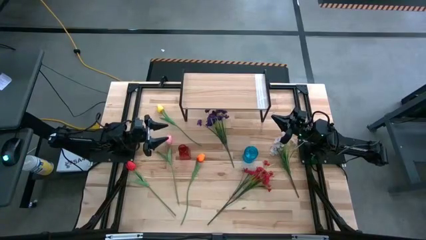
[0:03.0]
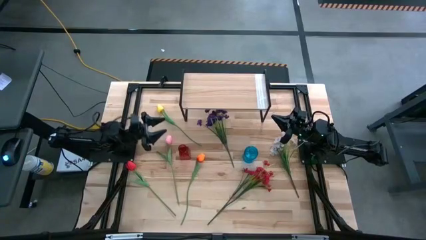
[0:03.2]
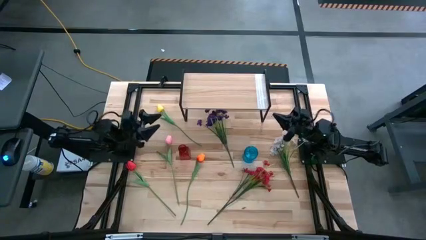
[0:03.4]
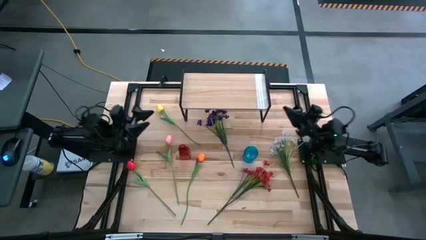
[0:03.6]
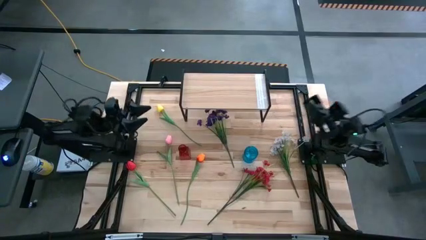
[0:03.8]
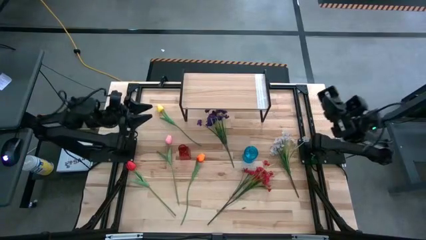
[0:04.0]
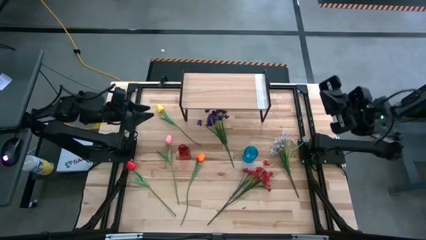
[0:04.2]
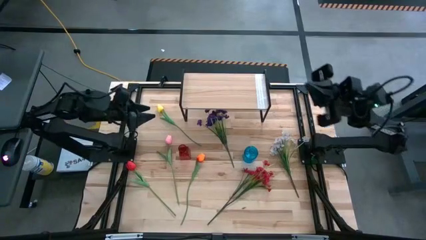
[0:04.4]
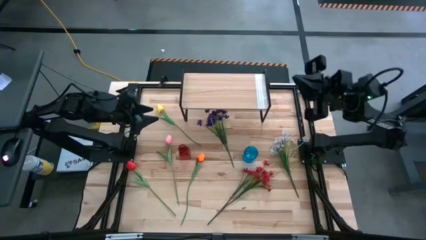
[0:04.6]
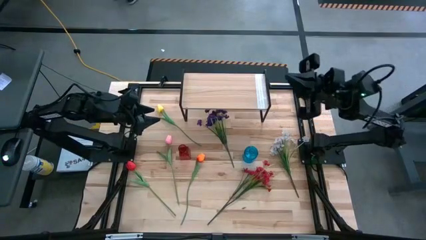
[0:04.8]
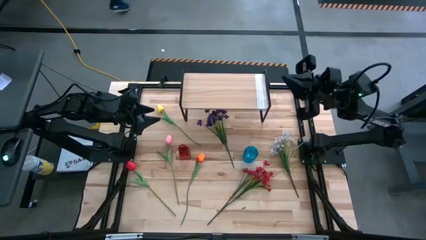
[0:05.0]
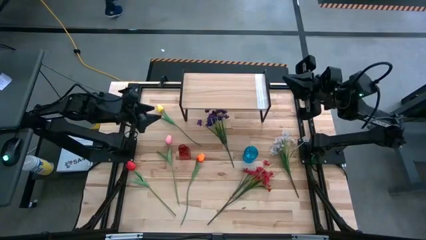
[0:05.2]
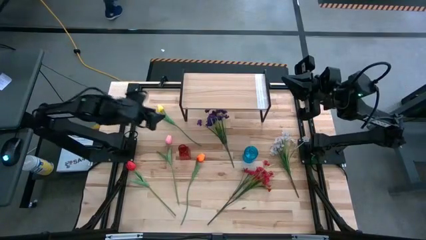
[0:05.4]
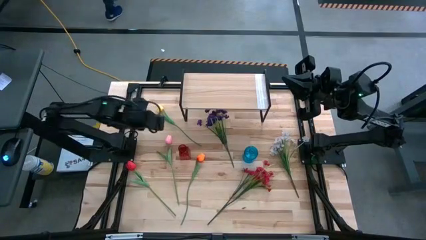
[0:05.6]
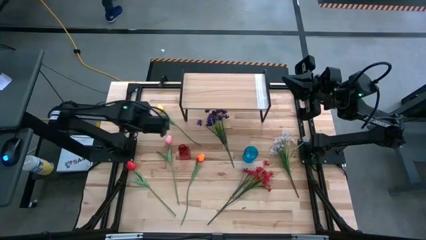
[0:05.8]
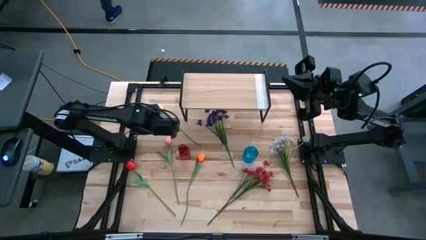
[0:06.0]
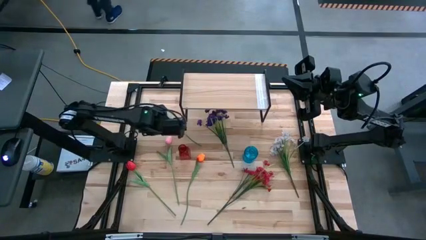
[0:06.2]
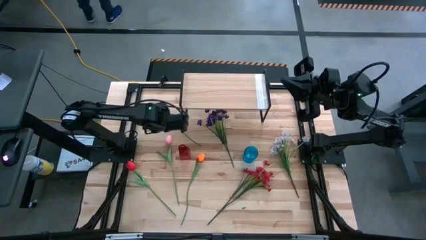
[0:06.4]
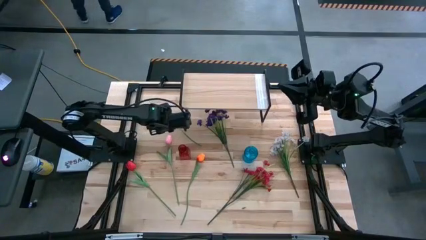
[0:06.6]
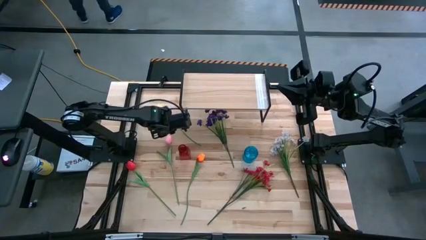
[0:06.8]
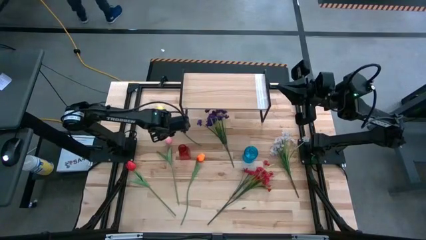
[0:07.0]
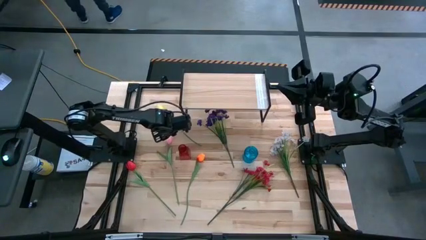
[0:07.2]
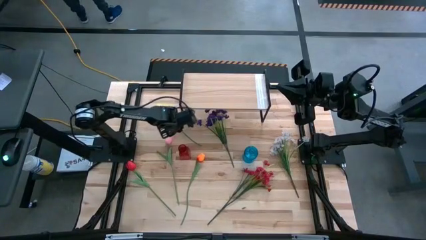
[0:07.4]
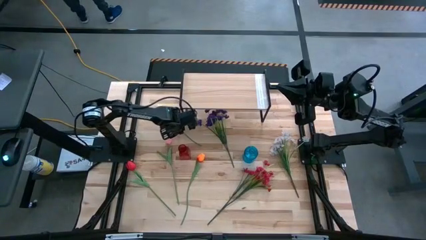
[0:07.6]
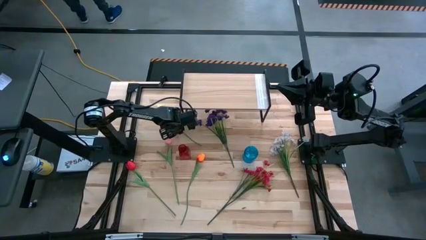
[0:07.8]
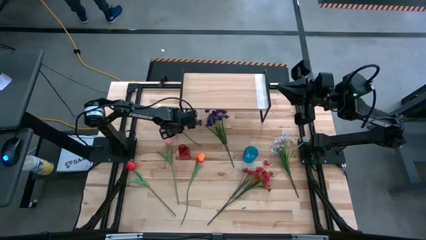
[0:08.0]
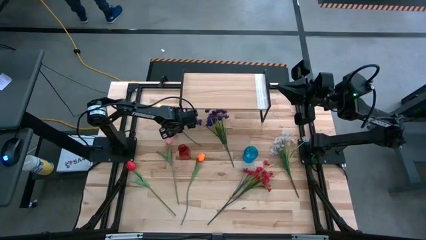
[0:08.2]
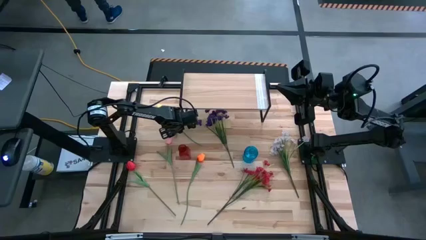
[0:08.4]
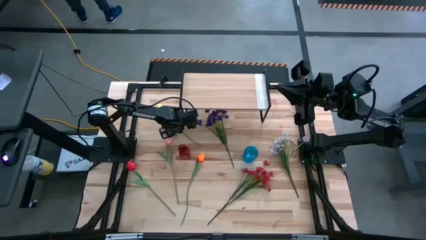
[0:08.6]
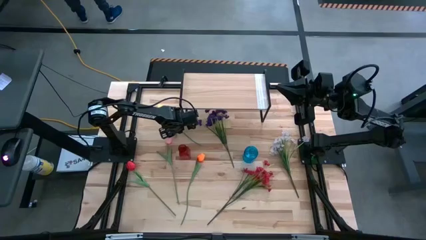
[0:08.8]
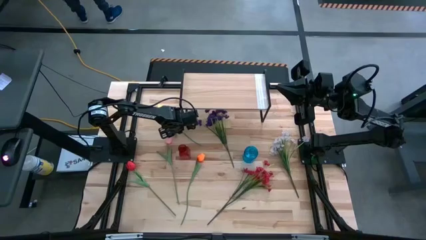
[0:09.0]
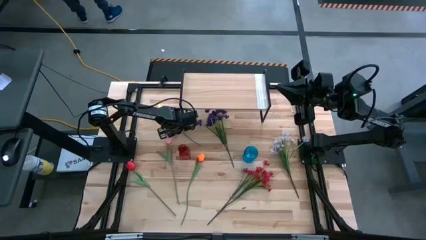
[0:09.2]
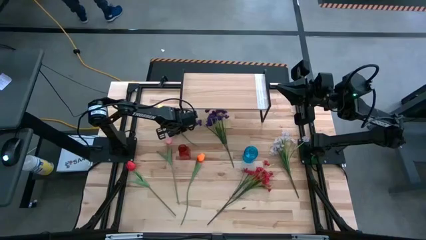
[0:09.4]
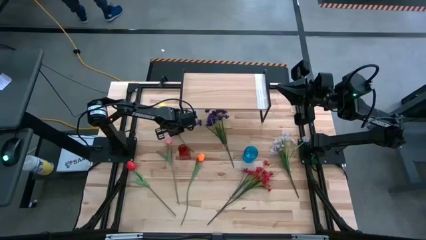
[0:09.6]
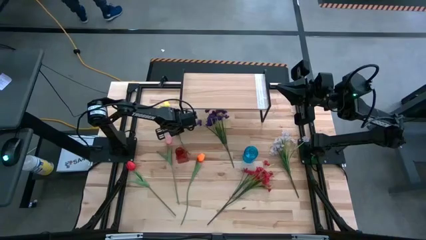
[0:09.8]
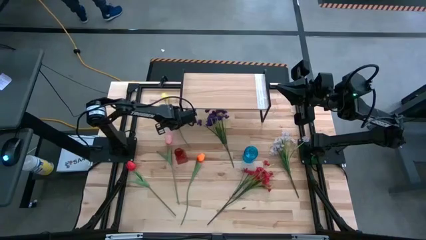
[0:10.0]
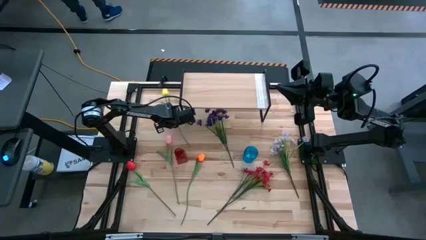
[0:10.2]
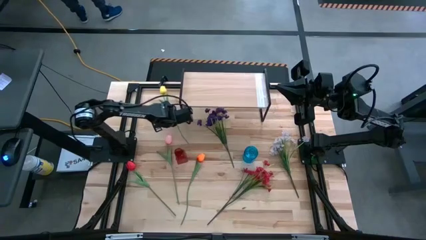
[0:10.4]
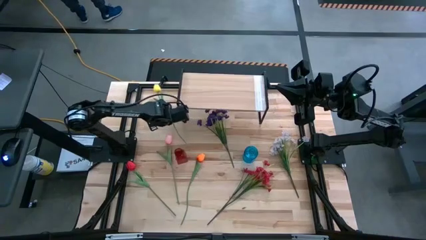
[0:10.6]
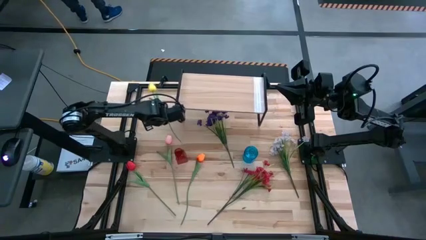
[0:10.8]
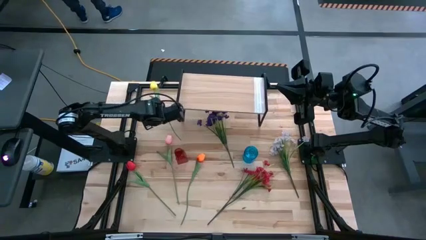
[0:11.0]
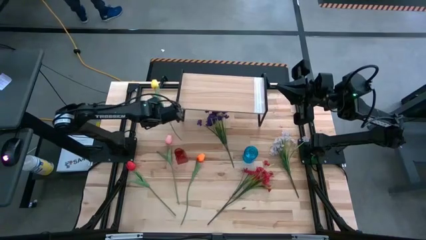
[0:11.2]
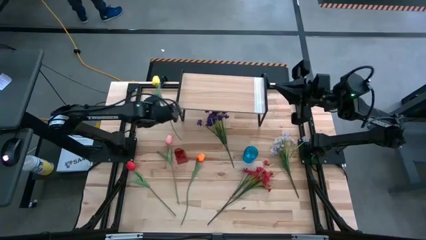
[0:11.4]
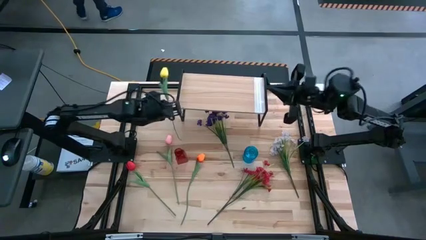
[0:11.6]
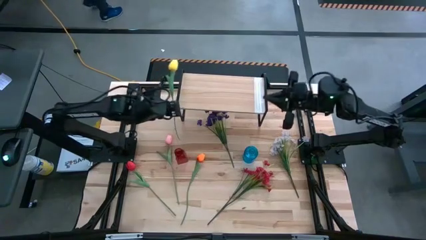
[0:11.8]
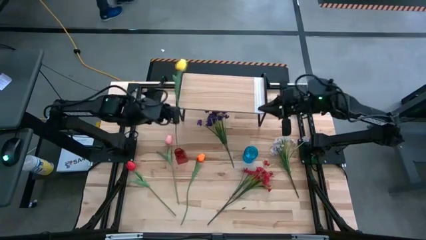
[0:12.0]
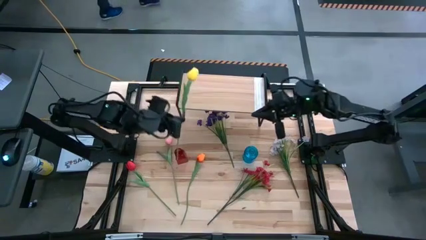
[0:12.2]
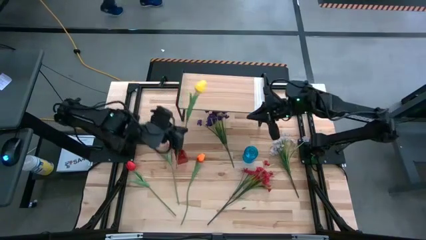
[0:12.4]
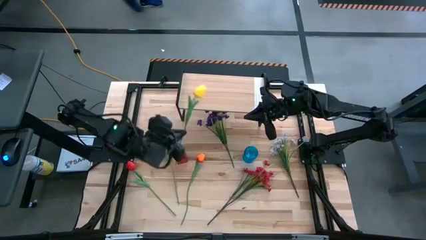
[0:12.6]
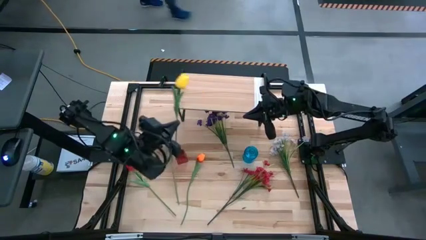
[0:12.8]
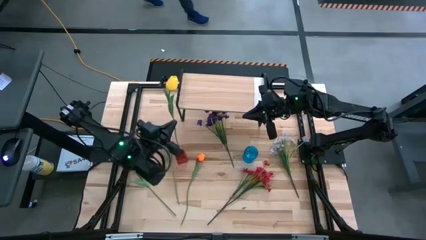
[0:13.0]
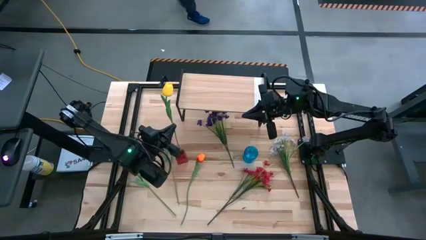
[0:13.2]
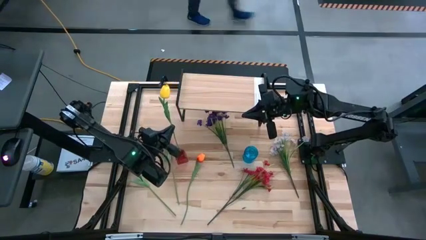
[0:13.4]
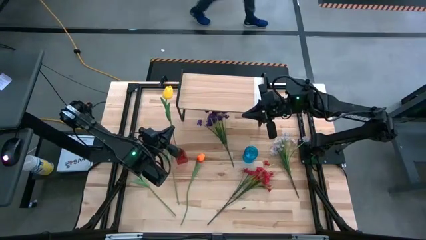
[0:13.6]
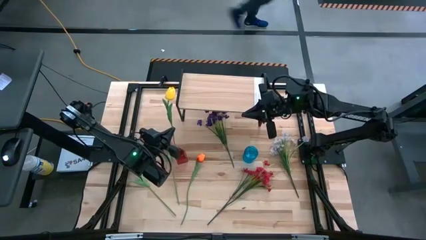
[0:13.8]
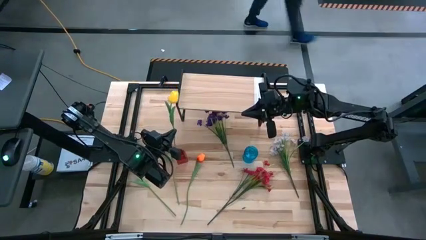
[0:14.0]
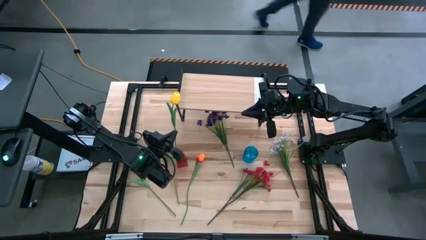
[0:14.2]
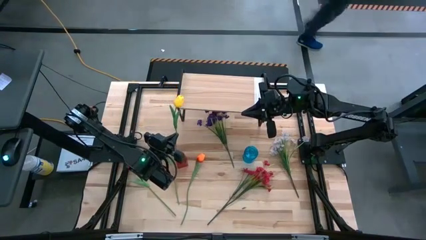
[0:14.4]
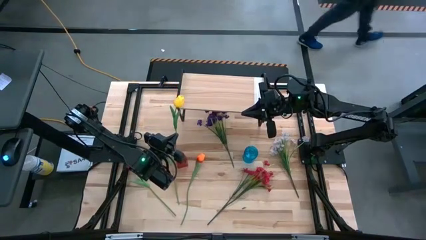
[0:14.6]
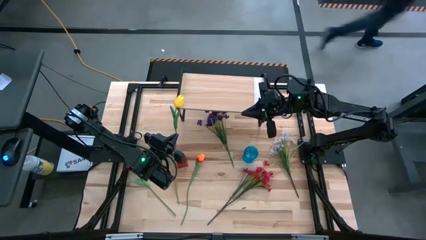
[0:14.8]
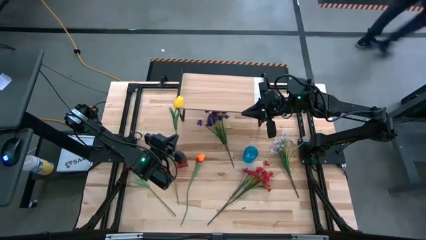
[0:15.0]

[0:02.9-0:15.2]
Task: Pick and place flowers into a vace then onto a shelf
Put the yellow flower into the red vase
